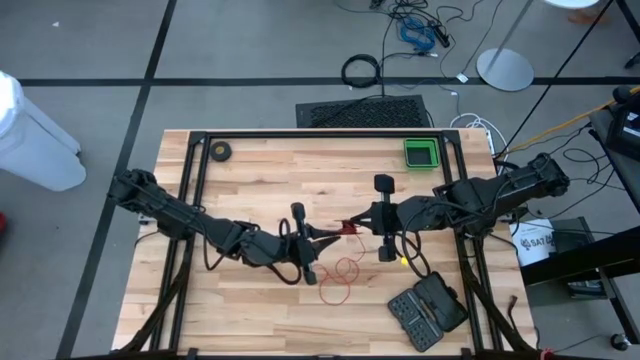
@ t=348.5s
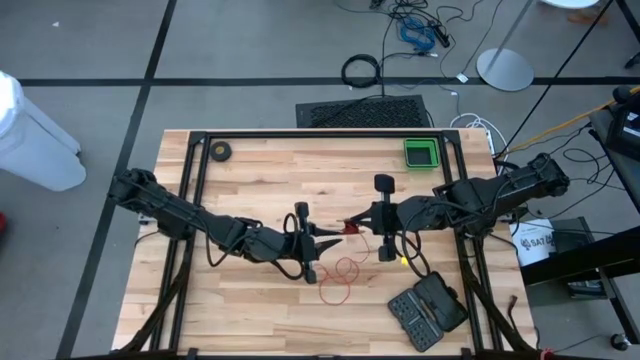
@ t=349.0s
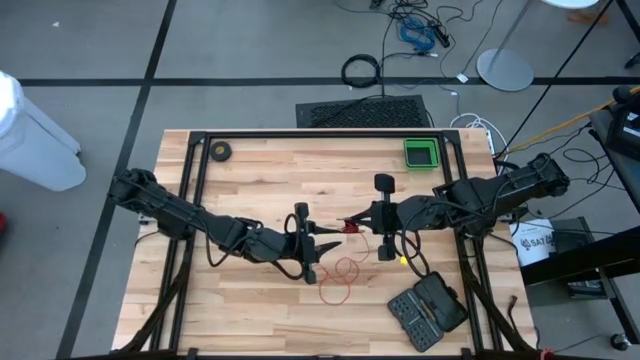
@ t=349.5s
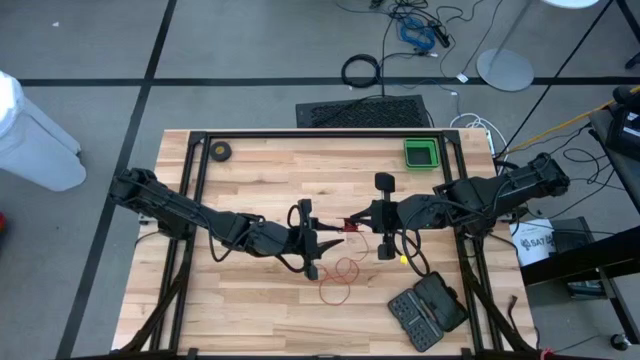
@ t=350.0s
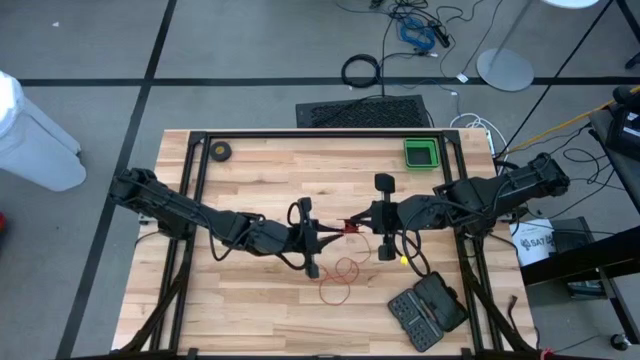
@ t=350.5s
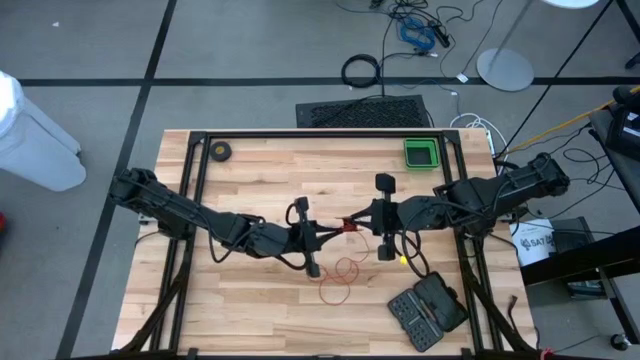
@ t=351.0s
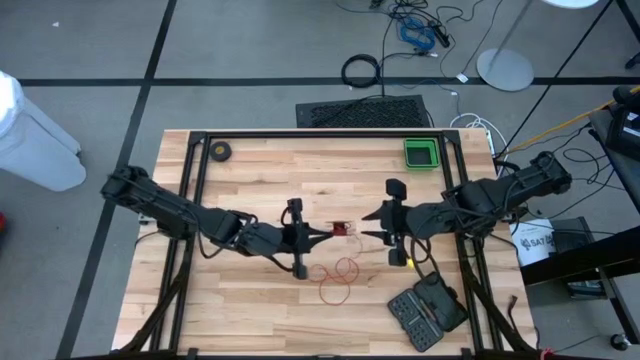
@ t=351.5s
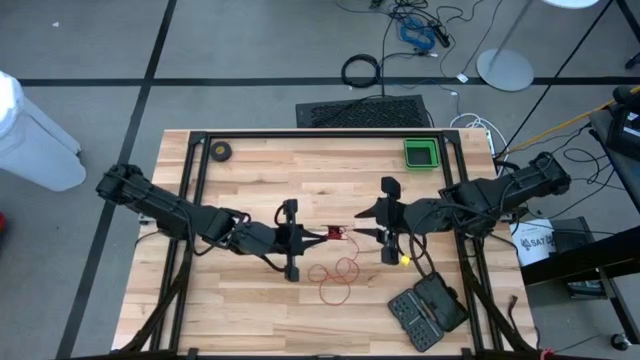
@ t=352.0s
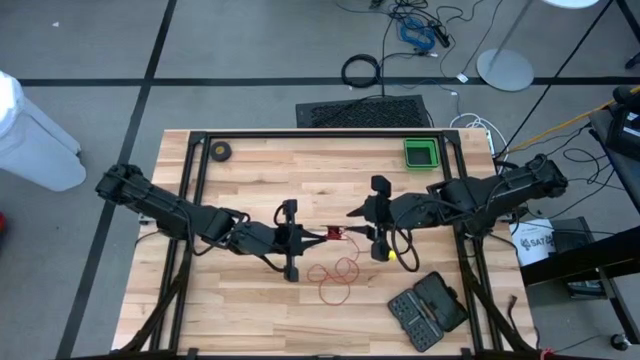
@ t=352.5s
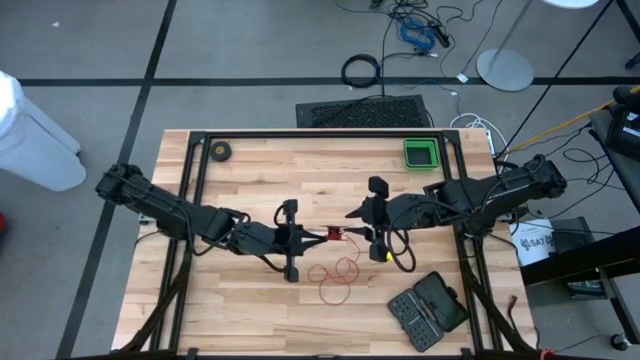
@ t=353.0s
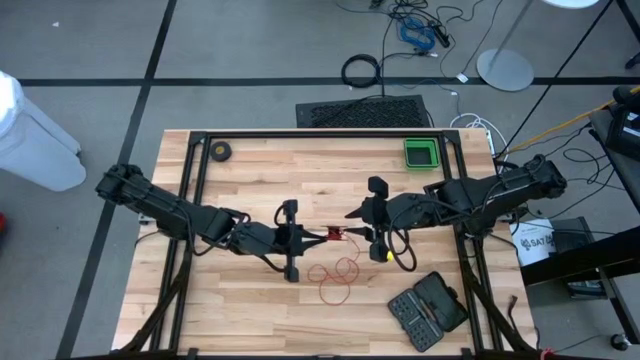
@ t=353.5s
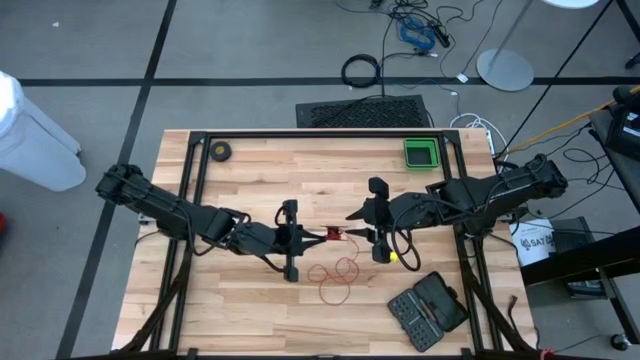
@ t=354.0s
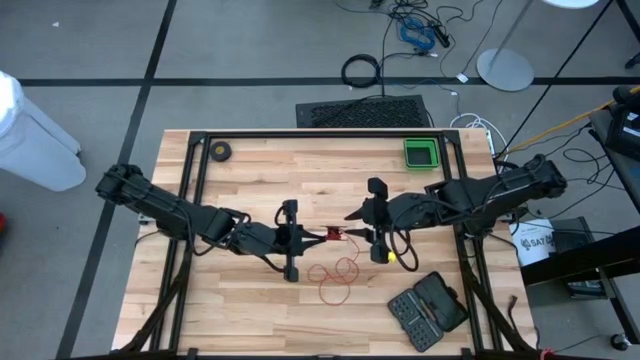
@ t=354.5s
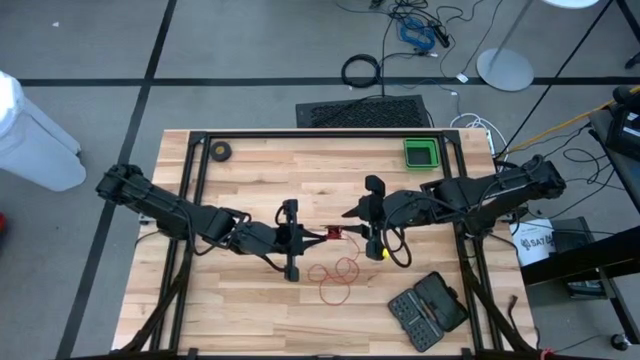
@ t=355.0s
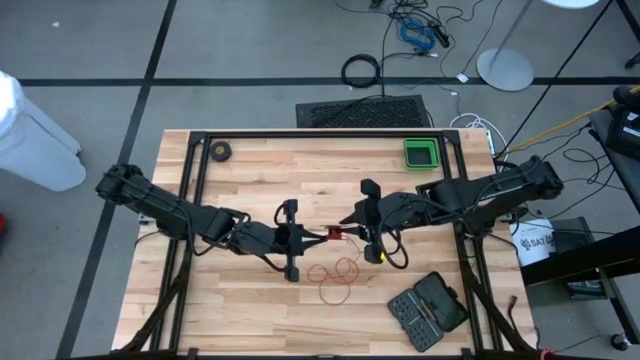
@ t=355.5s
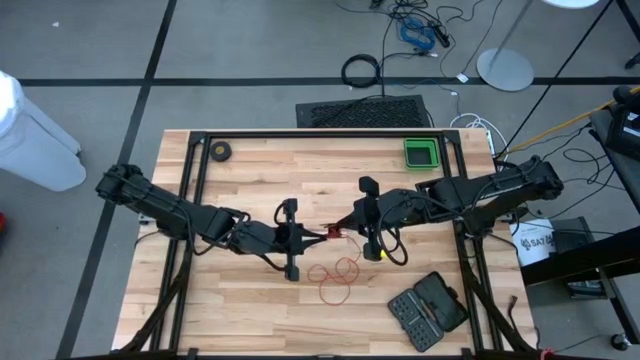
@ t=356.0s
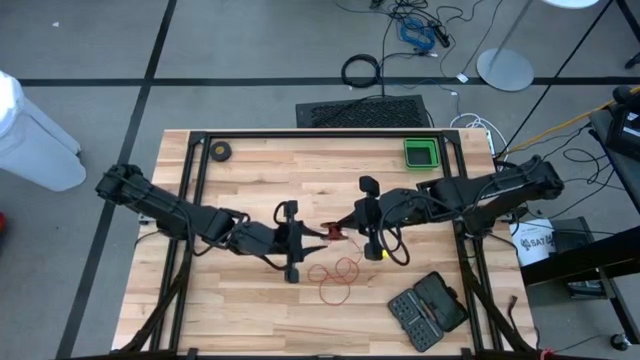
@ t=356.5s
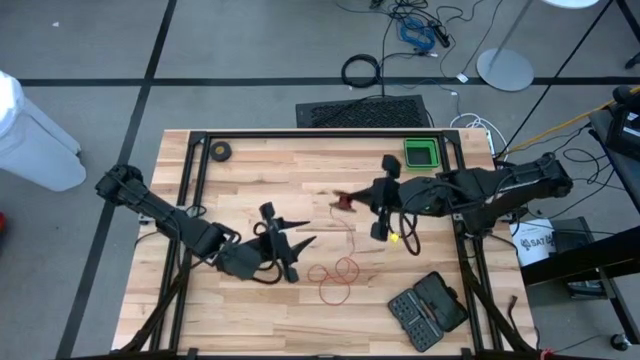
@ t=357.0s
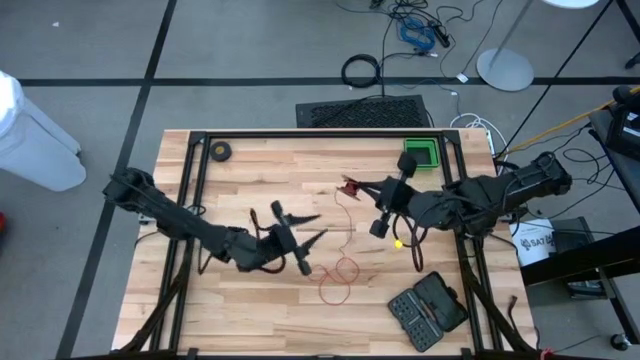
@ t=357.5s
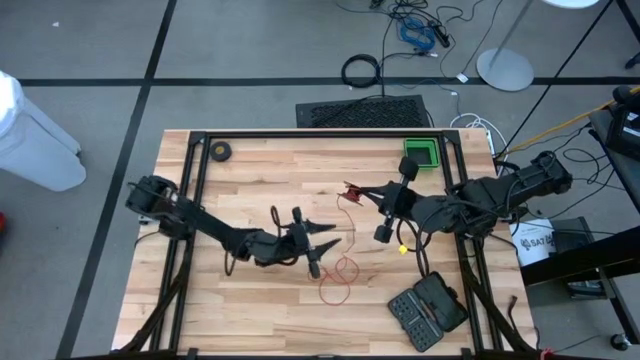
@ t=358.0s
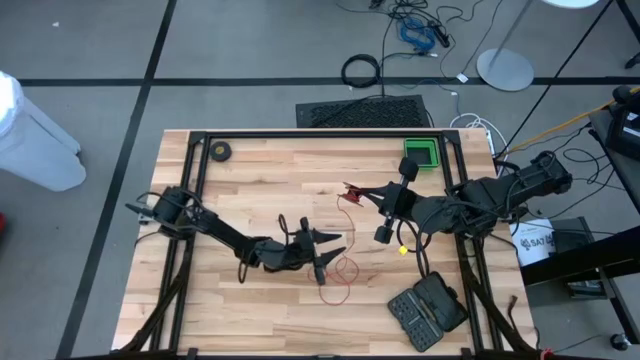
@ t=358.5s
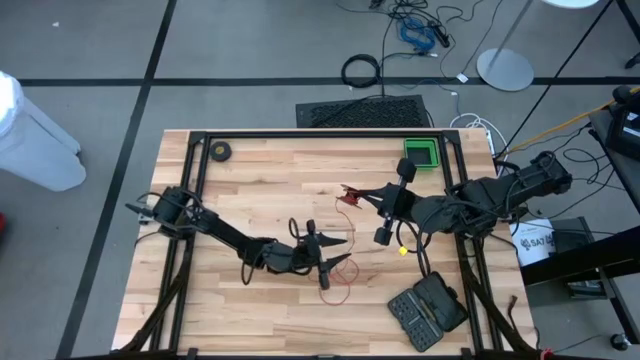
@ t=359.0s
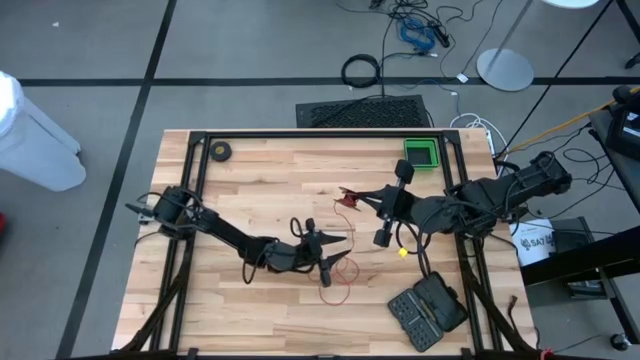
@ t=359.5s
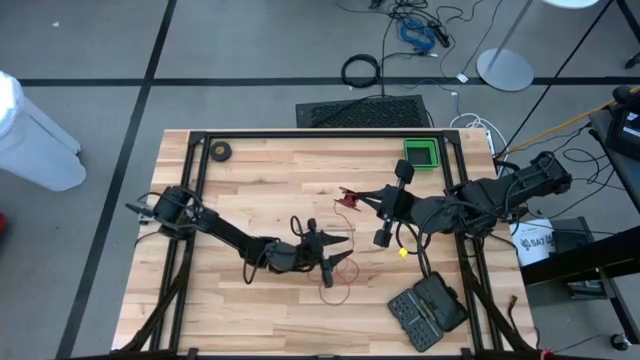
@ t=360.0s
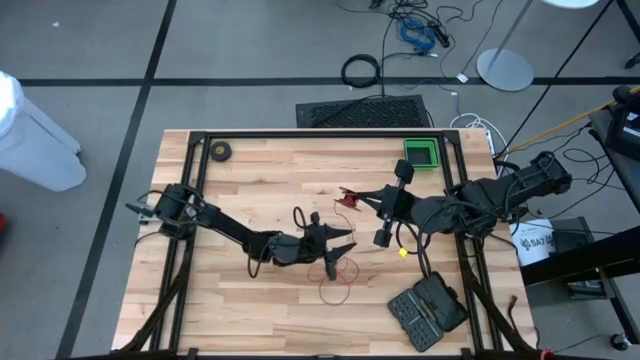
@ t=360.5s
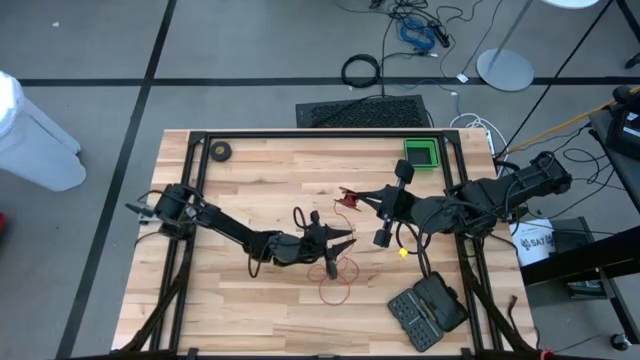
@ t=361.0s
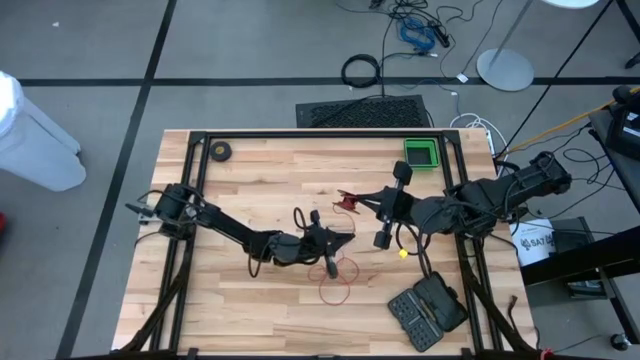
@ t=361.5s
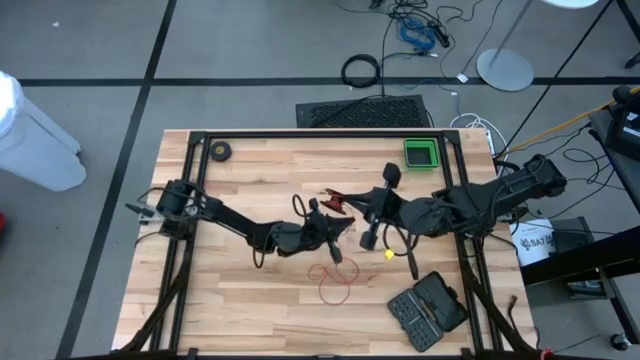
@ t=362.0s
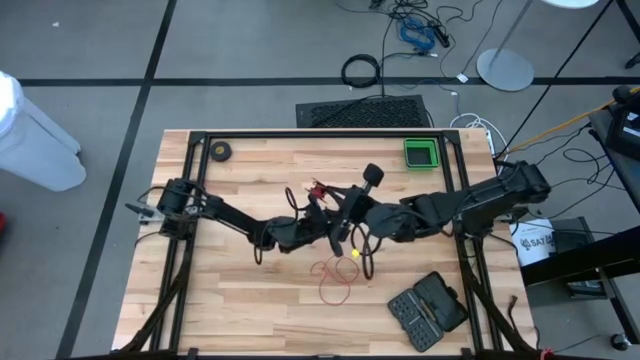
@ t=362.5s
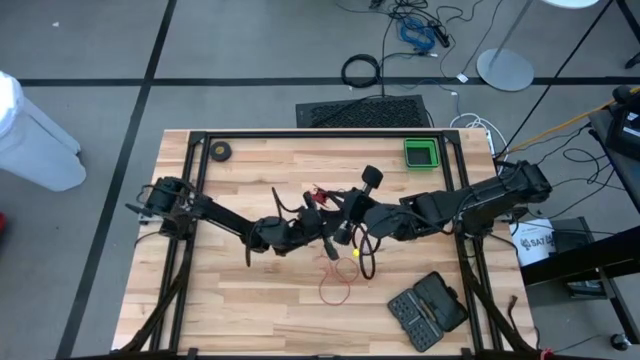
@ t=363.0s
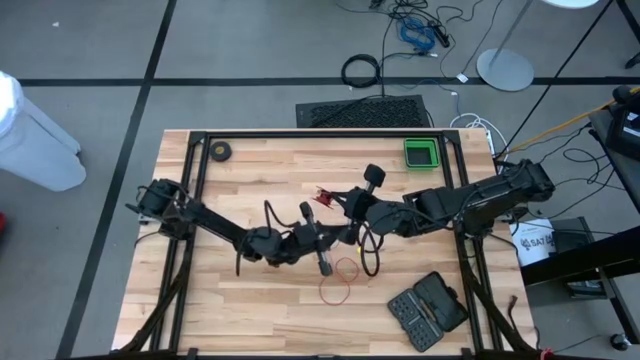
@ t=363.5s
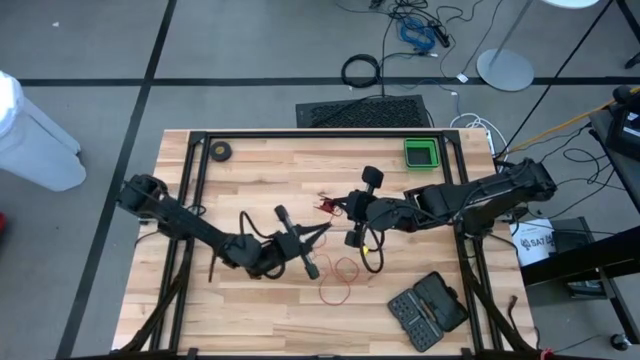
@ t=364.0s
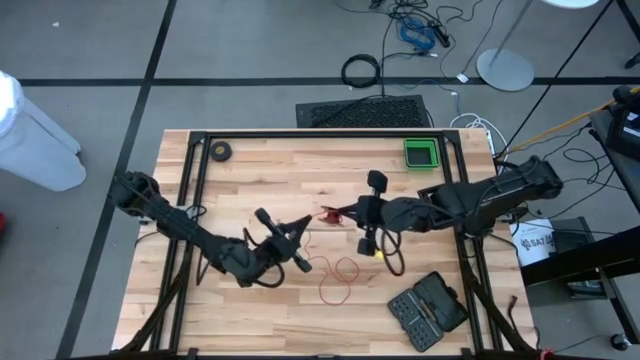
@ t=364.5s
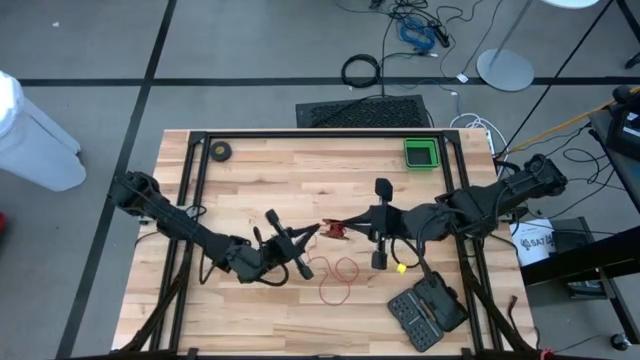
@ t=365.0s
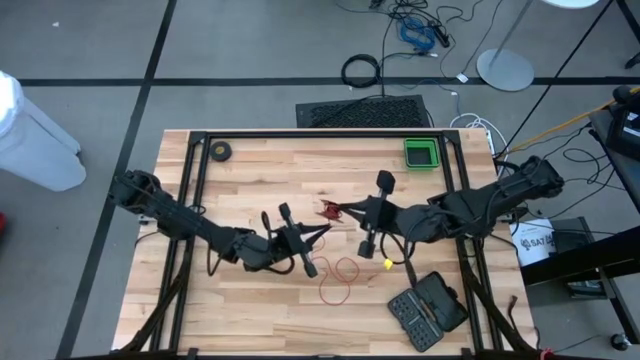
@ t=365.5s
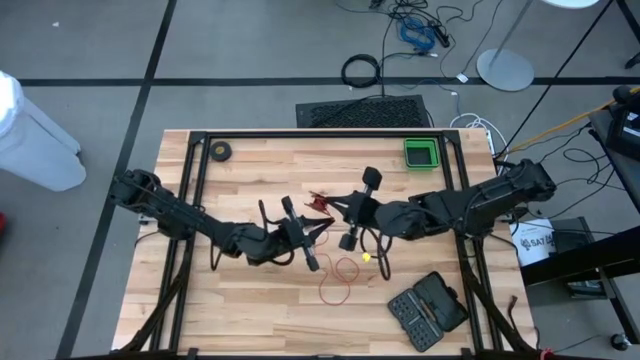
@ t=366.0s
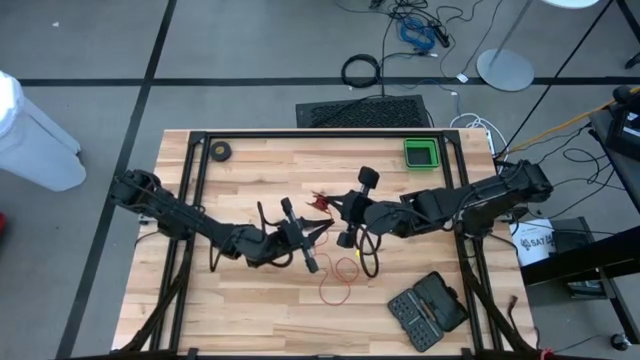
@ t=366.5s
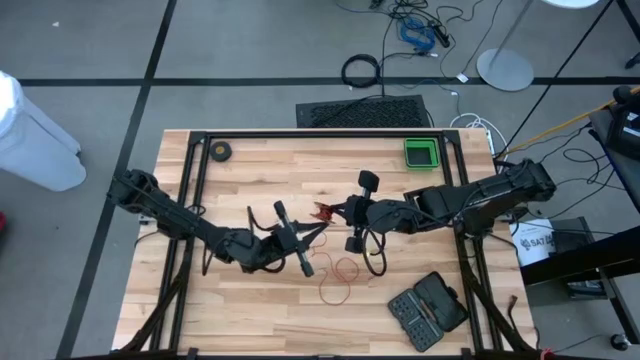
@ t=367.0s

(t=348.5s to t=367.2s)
Task: Coil cords
Coil the red wire into the spool
